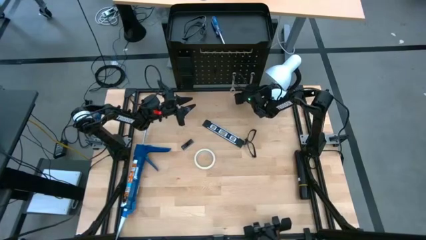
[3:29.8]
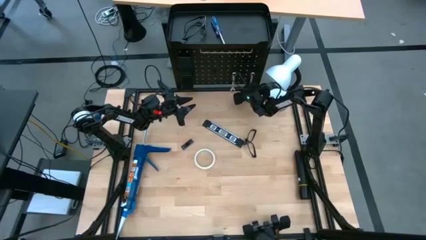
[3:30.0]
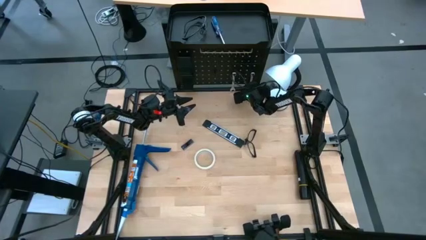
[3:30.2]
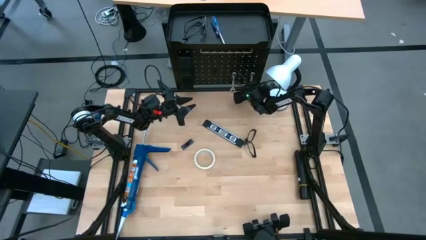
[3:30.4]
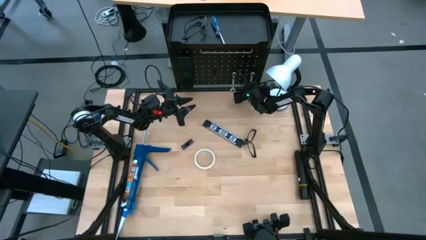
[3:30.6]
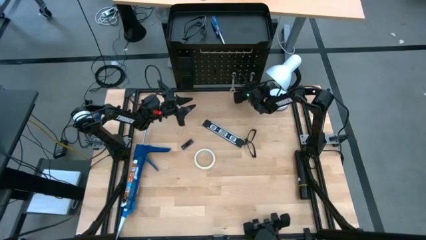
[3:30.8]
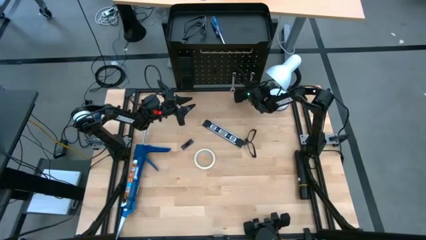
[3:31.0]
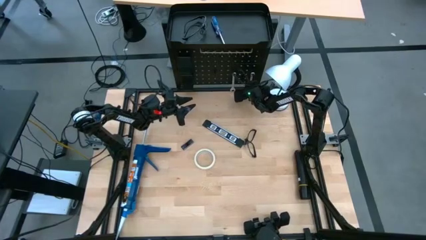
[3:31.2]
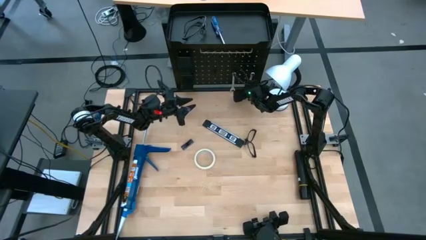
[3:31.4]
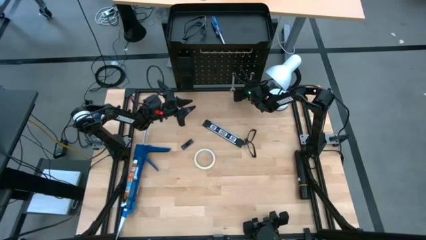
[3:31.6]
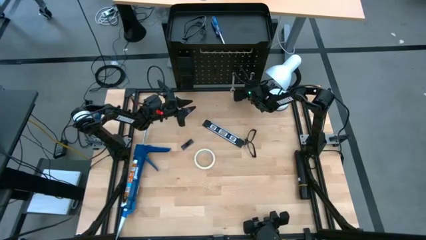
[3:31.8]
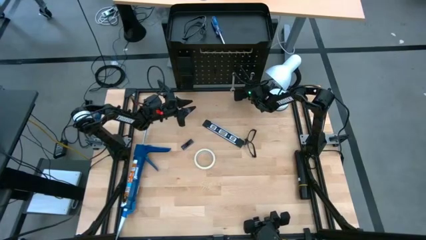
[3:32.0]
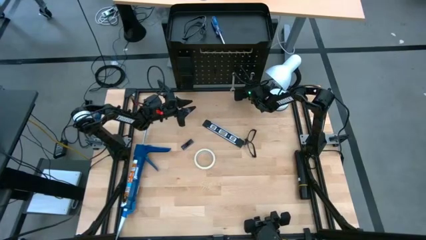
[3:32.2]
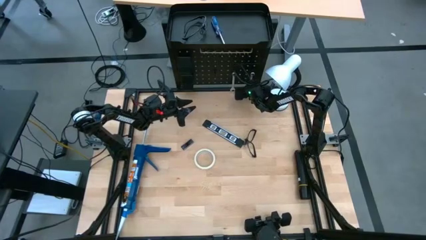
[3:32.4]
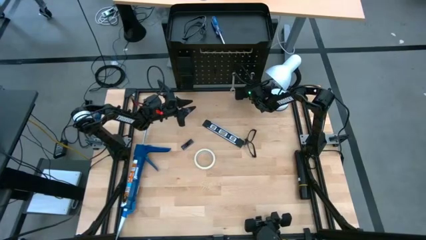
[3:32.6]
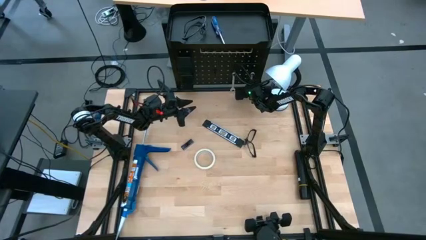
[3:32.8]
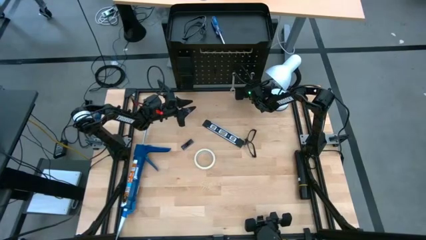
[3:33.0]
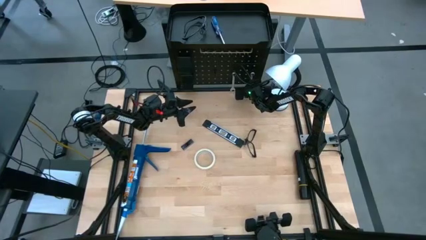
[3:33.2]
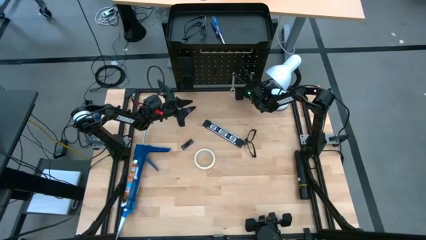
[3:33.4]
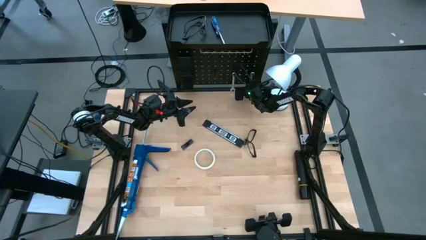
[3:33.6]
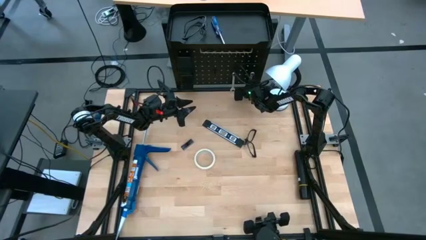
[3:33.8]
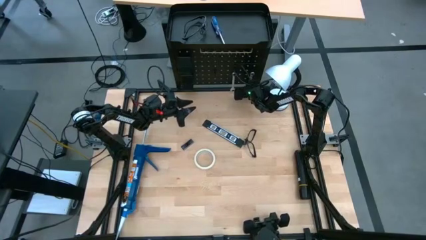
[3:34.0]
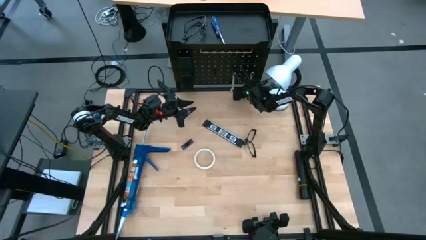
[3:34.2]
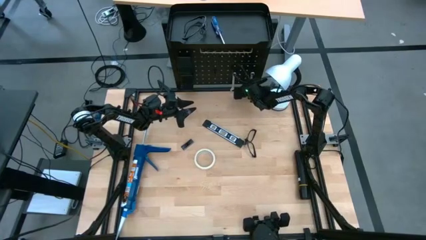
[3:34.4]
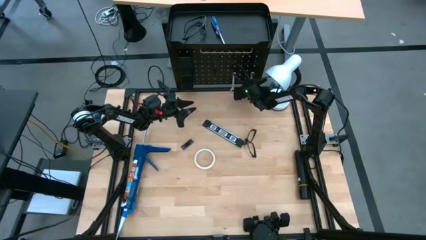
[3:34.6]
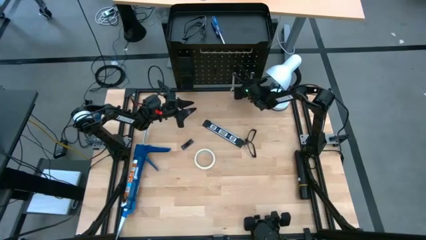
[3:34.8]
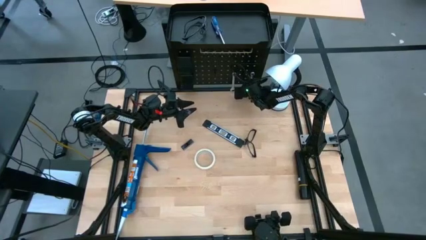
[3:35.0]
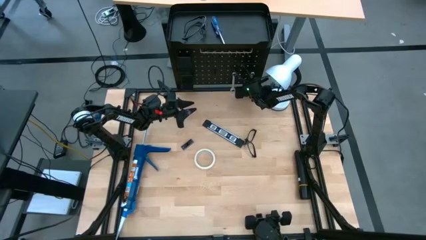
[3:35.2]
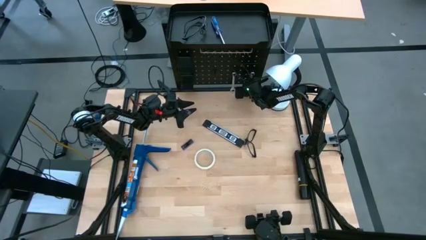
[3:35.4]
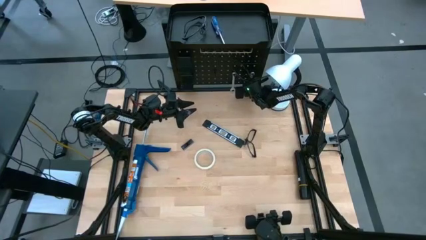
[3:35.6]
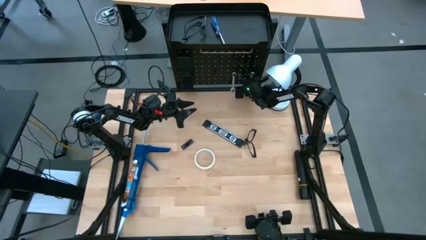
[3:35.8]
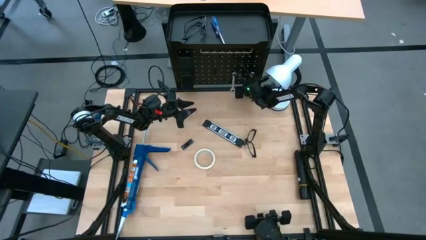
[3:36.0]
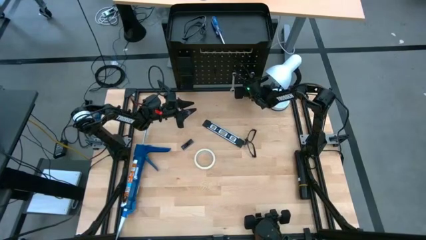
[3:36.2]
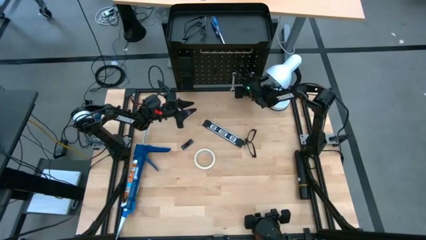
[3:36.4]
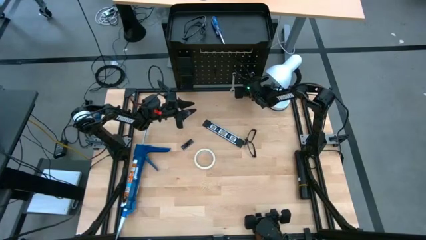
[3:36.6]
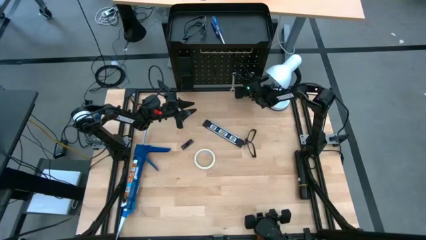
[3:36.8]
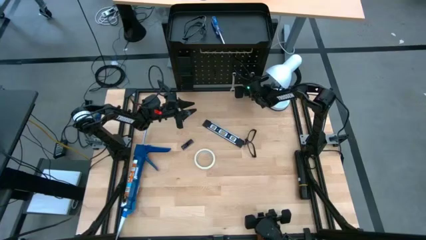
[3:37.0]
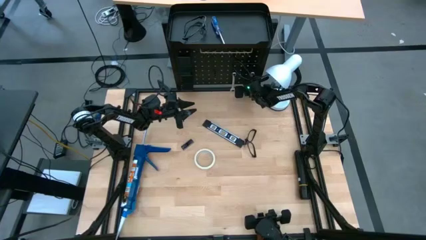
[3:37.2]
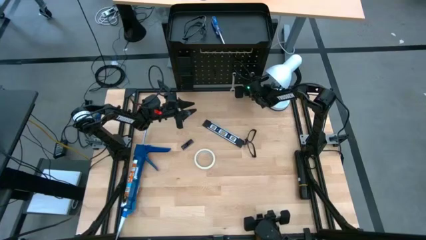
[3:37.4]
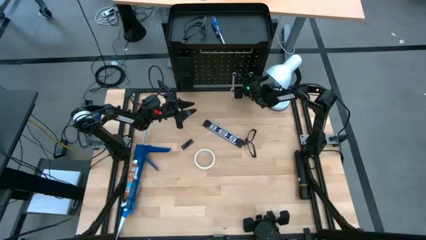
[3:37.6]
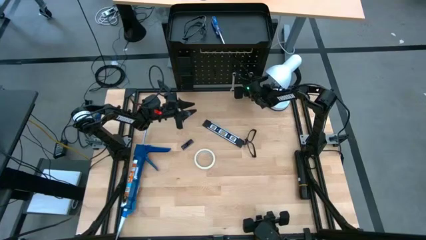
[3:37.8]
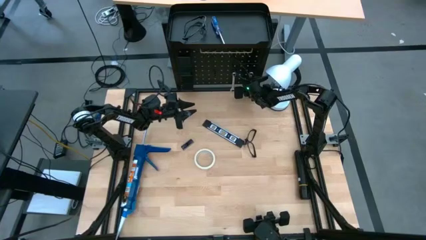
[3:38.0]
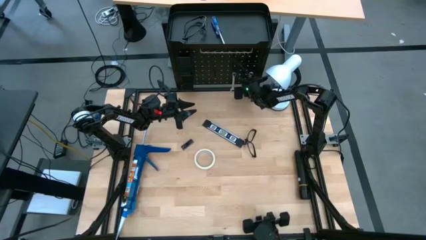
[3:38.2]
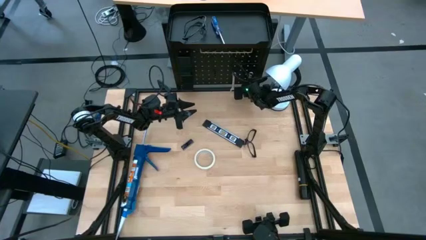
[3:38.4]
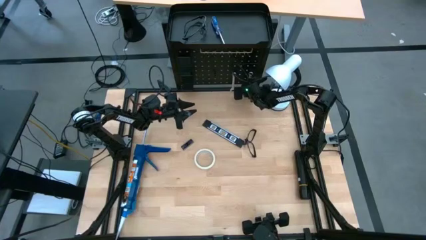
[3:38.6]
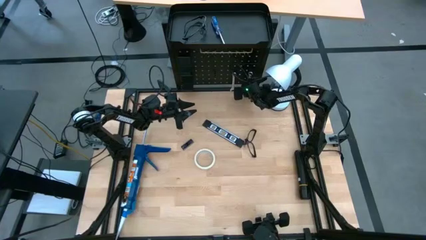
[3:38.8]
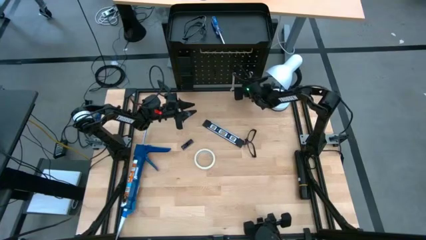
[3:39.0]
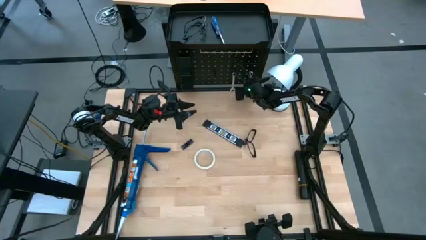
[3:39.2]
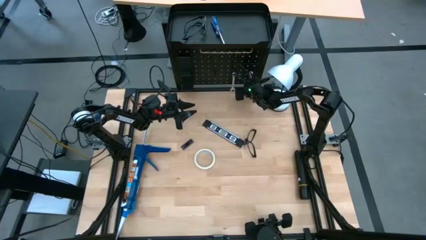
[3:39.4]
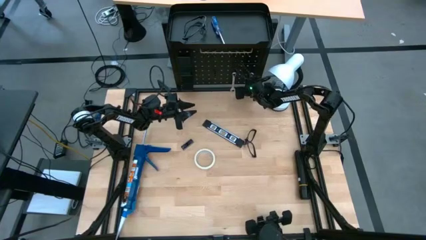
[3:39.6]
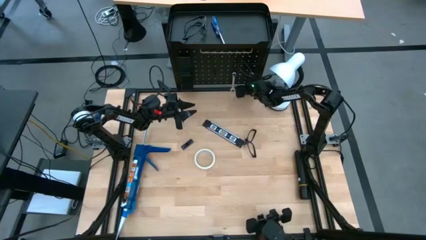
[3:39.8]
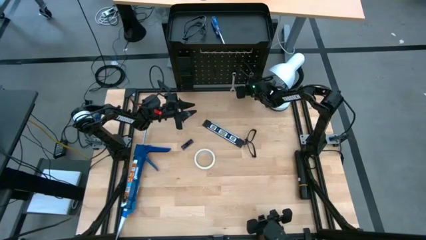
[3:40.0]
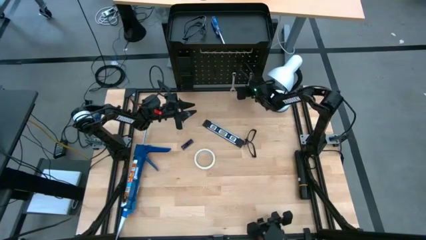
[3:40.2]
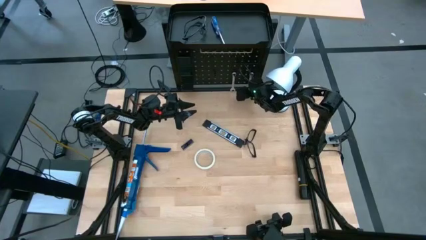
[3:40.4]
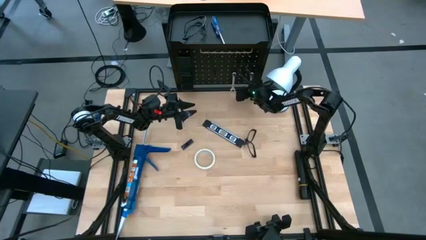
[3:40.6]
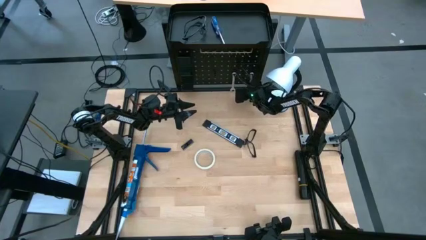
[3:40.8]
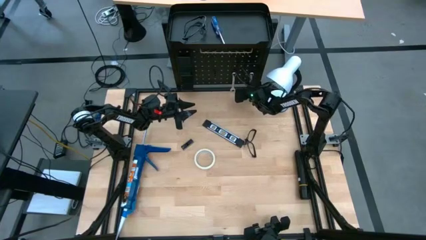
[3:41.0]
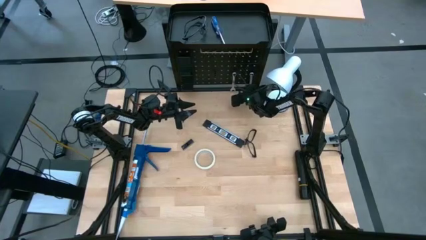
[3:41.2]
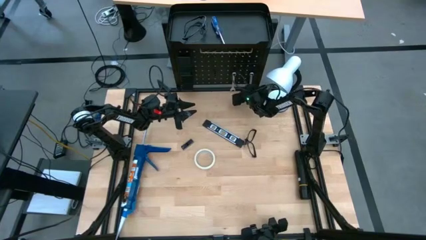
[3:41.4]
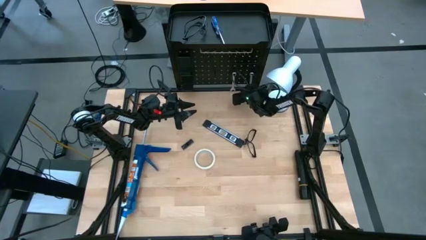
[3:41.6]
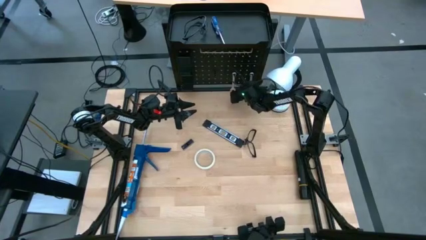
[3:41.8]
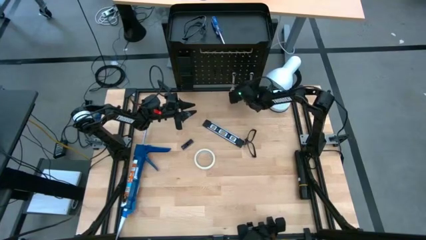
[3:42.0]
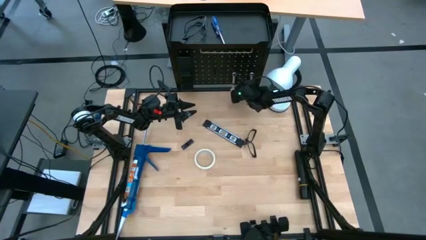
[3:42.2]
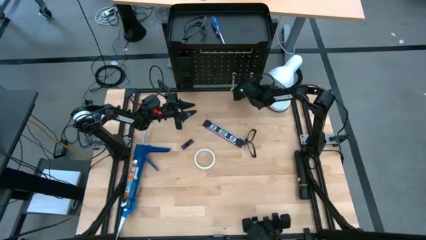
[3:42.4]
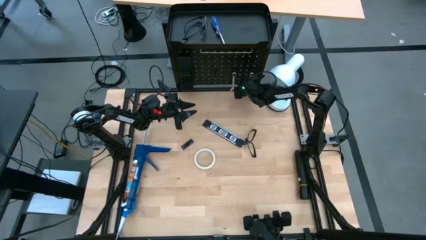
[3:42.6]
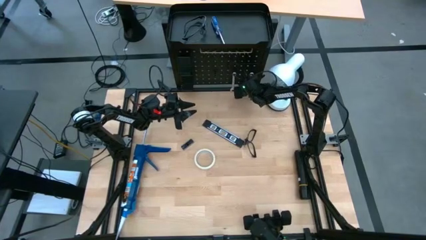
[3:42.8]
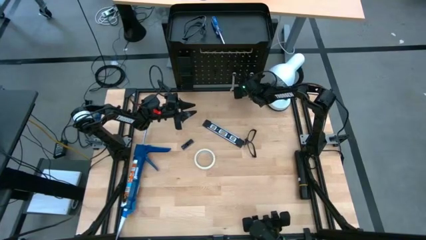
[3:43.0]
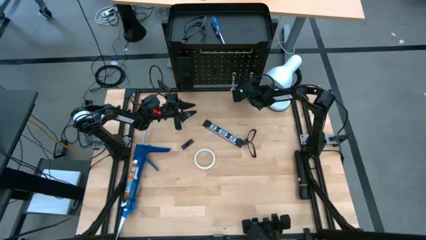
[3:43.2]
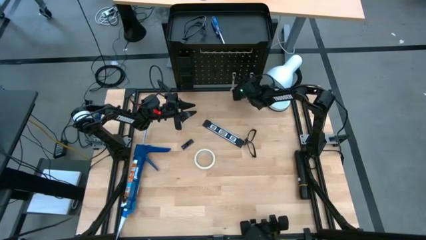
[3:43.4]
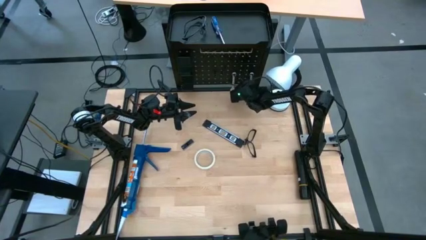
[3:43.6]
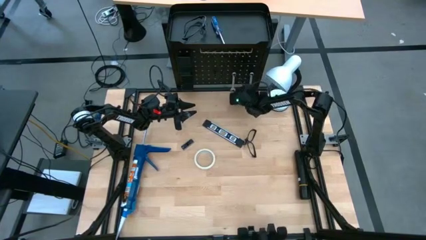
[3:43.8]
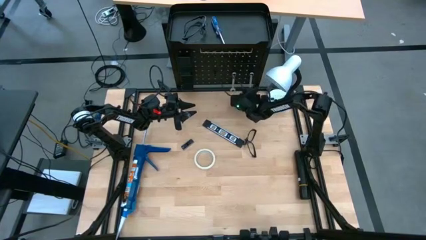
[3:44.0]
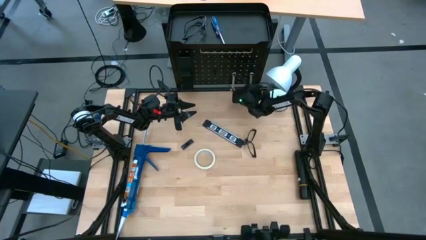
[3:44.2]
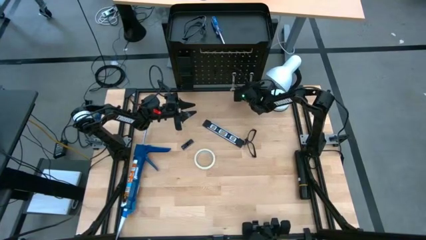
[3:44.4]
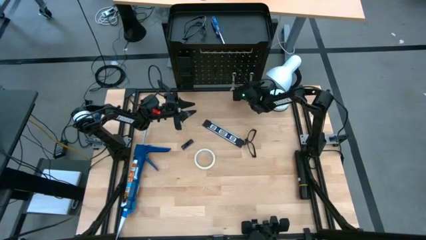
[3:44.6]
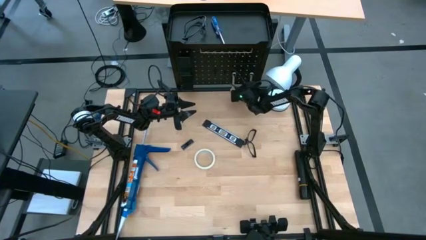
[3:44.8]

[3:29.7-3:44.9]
Task: Hang tools onto peg board
Unhang the right wrench from the peg board
